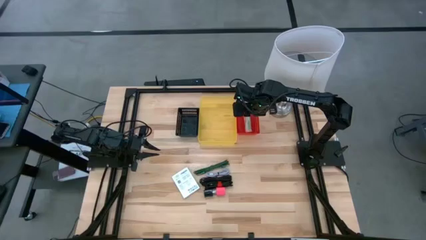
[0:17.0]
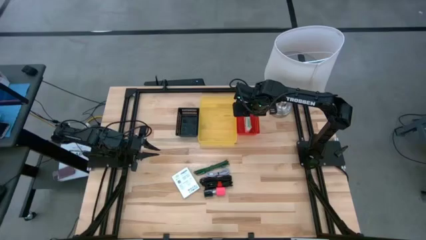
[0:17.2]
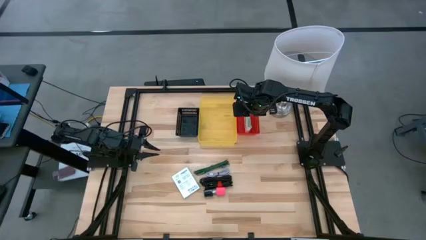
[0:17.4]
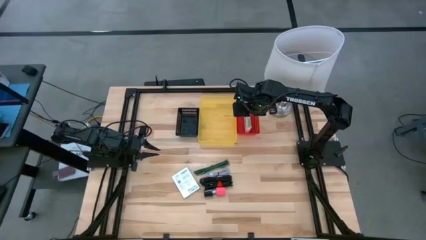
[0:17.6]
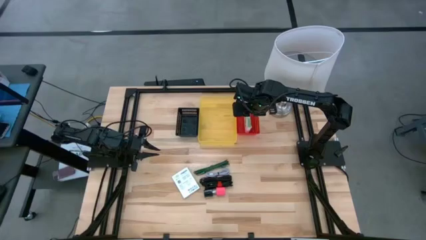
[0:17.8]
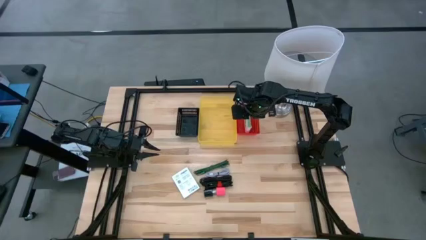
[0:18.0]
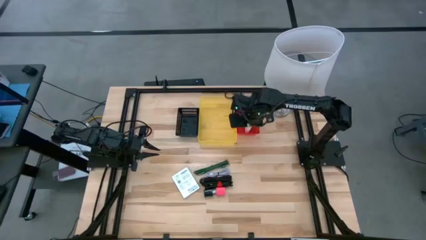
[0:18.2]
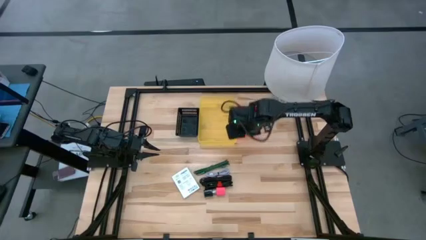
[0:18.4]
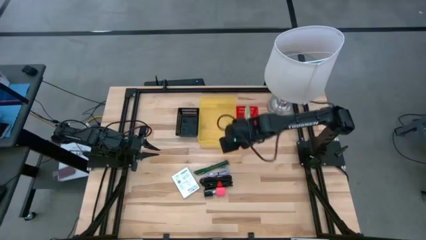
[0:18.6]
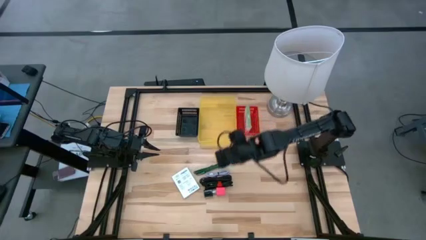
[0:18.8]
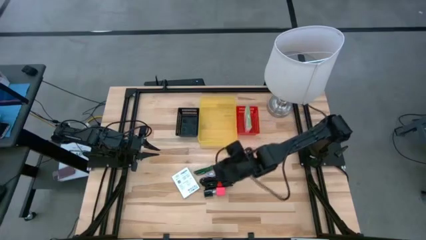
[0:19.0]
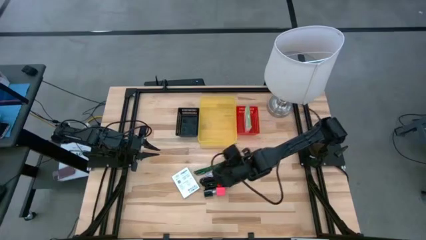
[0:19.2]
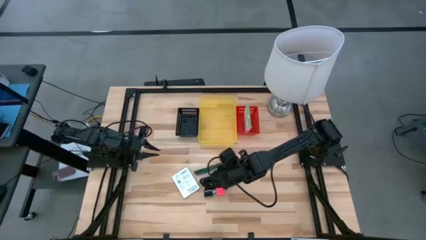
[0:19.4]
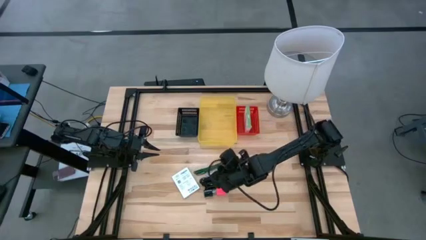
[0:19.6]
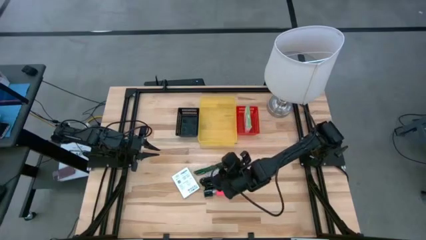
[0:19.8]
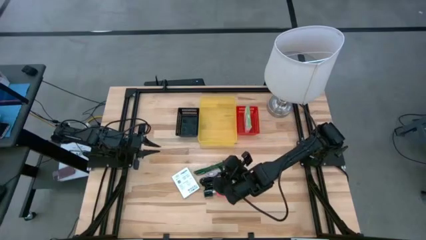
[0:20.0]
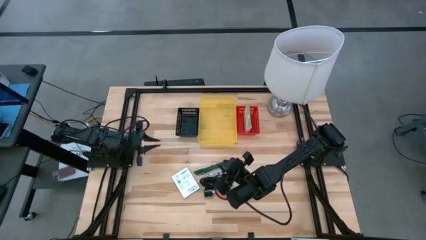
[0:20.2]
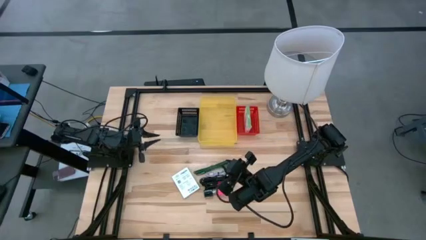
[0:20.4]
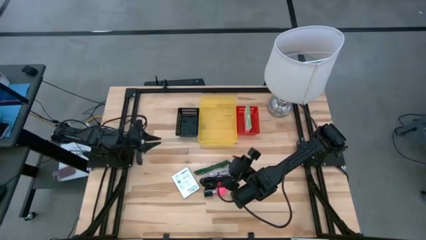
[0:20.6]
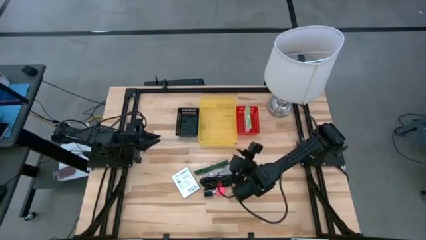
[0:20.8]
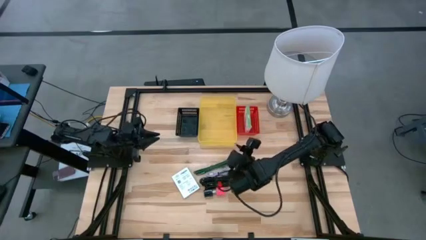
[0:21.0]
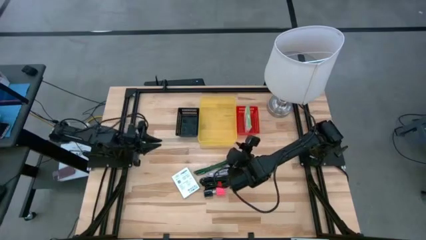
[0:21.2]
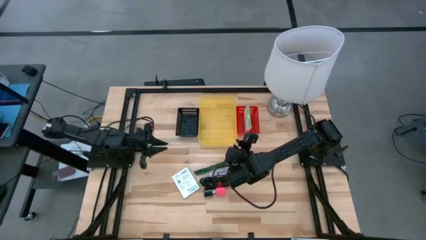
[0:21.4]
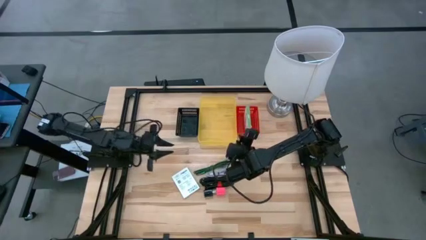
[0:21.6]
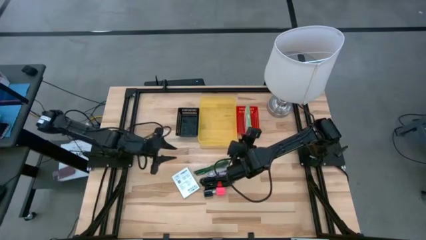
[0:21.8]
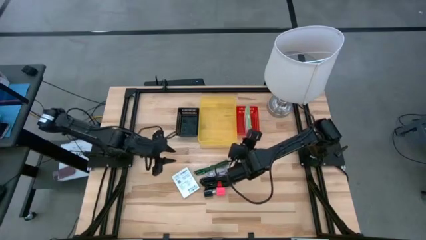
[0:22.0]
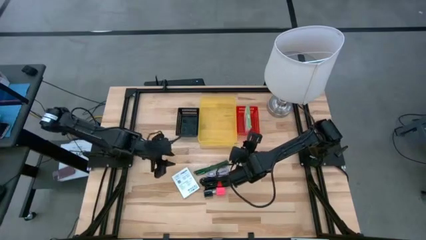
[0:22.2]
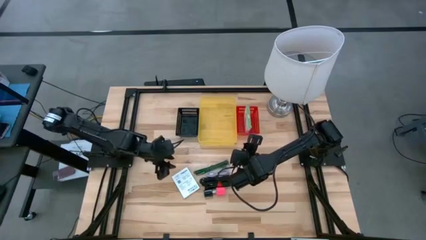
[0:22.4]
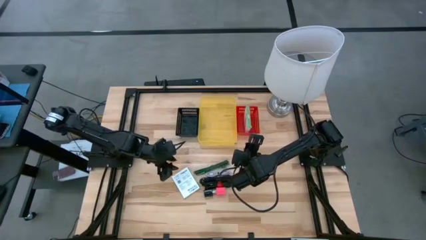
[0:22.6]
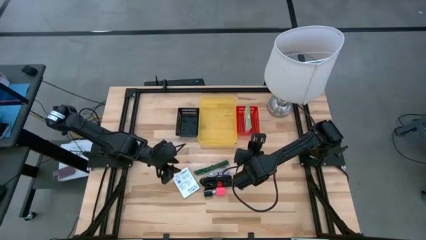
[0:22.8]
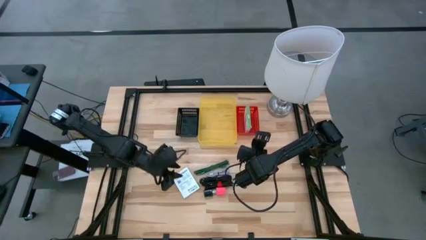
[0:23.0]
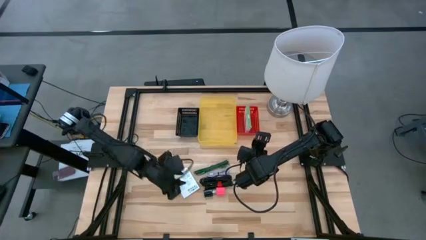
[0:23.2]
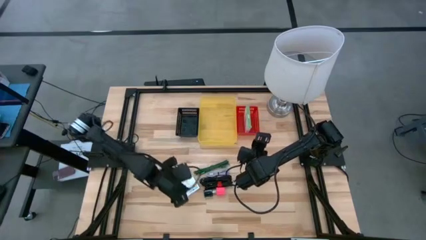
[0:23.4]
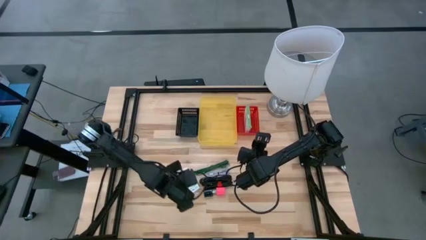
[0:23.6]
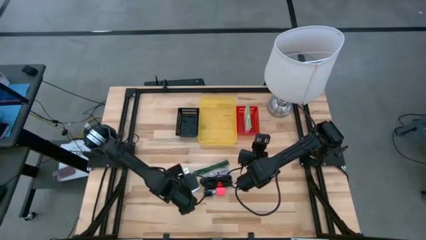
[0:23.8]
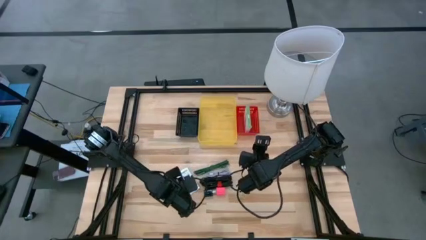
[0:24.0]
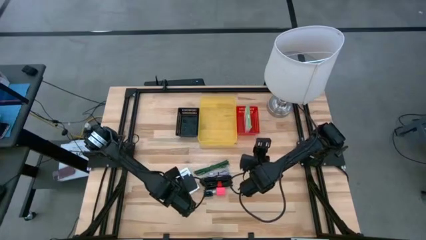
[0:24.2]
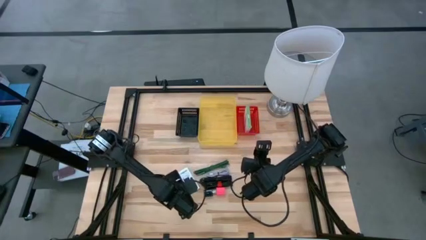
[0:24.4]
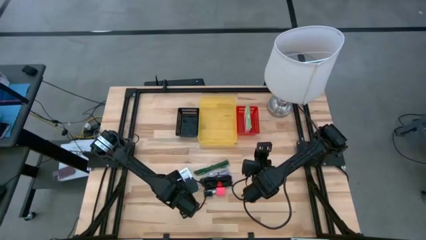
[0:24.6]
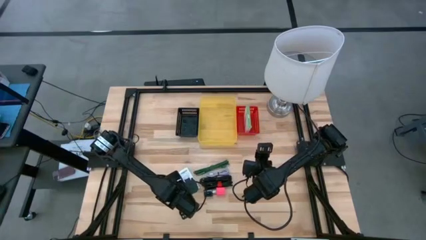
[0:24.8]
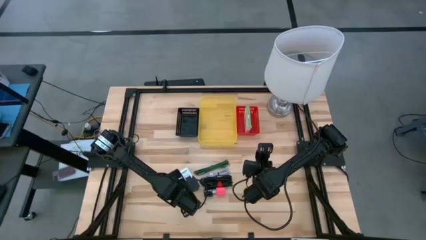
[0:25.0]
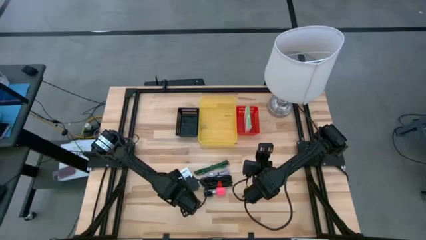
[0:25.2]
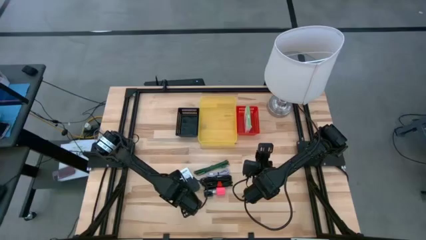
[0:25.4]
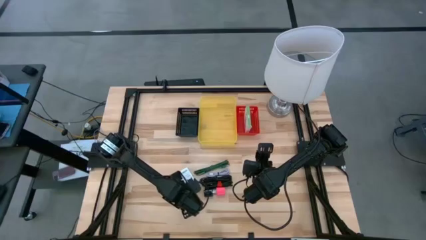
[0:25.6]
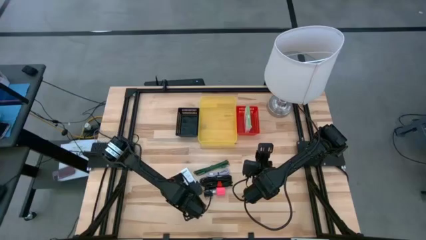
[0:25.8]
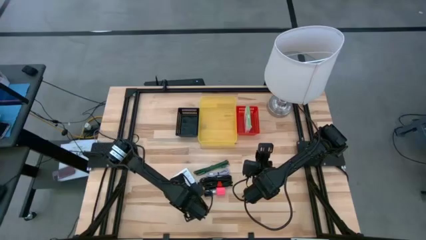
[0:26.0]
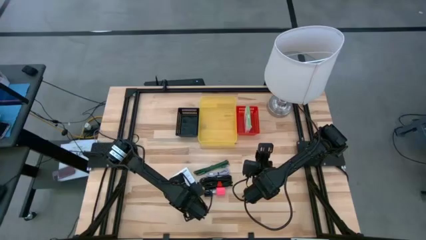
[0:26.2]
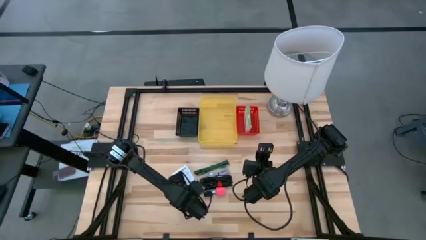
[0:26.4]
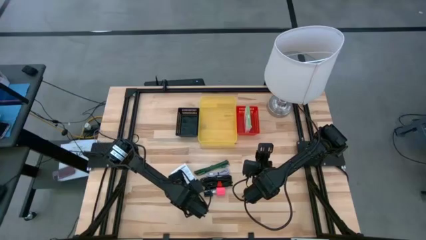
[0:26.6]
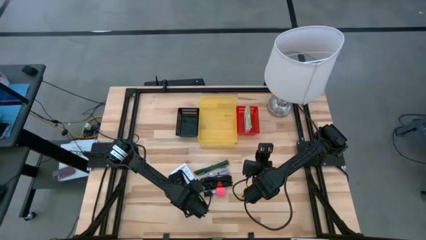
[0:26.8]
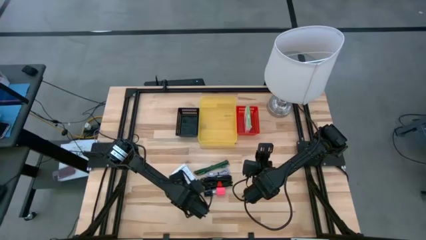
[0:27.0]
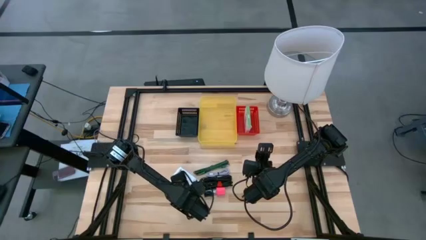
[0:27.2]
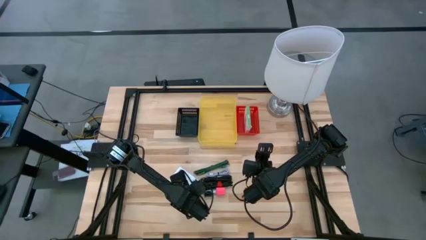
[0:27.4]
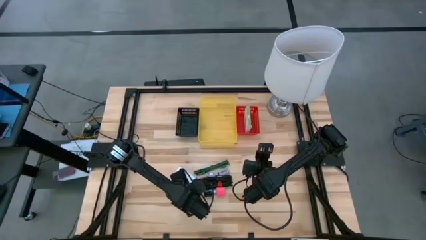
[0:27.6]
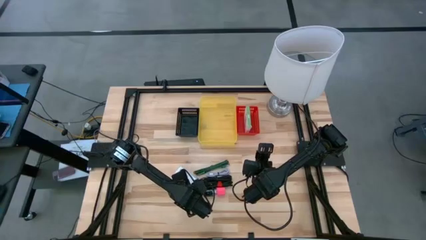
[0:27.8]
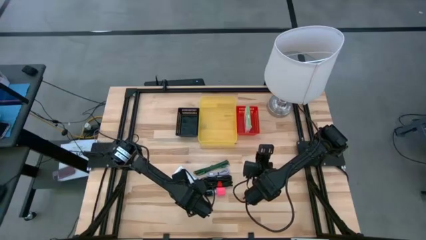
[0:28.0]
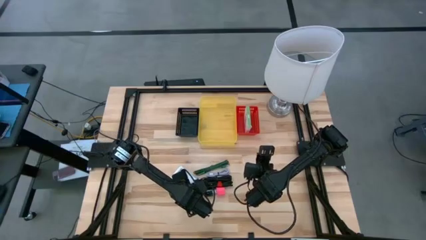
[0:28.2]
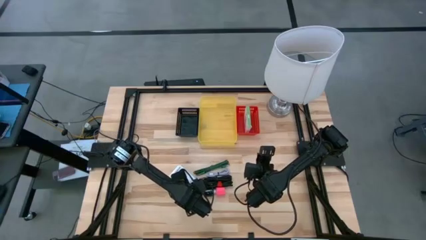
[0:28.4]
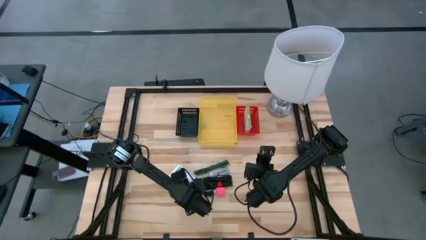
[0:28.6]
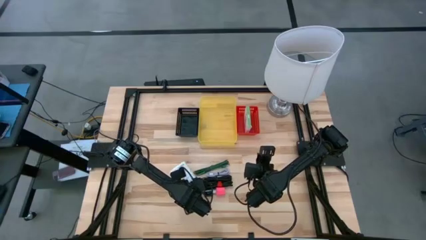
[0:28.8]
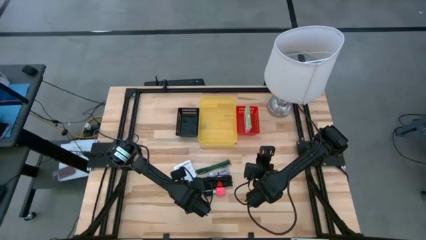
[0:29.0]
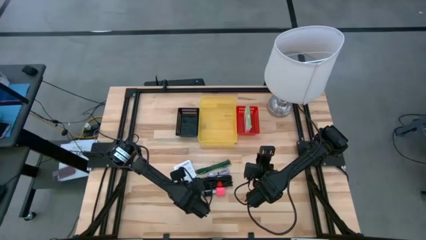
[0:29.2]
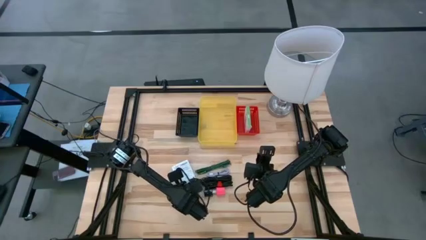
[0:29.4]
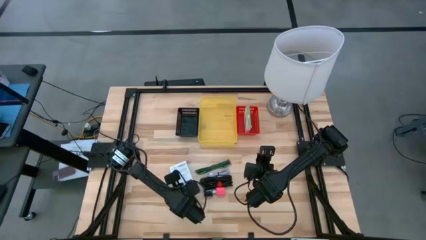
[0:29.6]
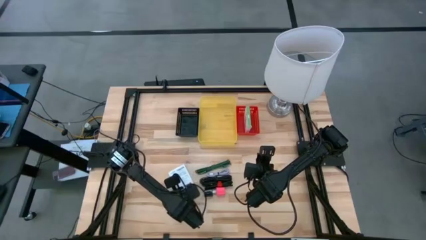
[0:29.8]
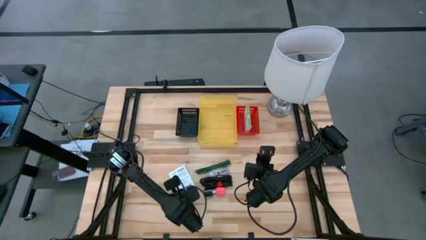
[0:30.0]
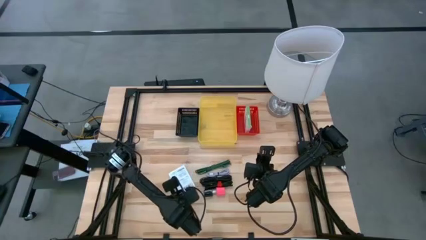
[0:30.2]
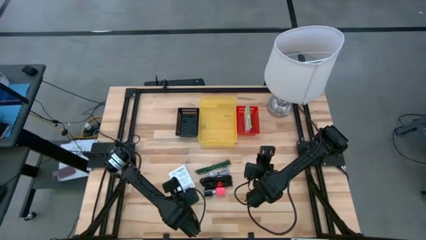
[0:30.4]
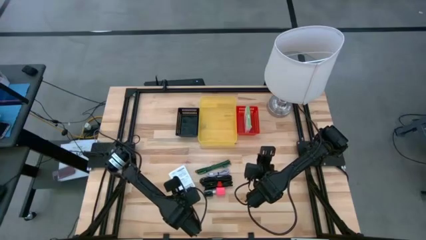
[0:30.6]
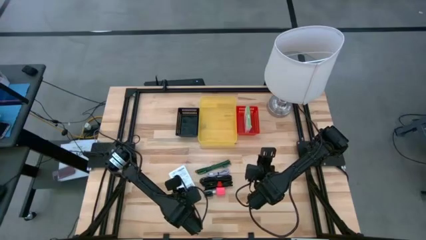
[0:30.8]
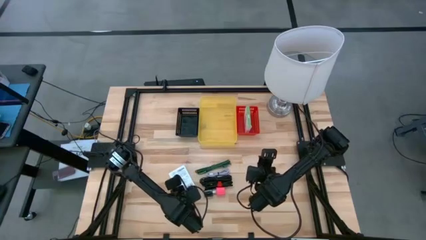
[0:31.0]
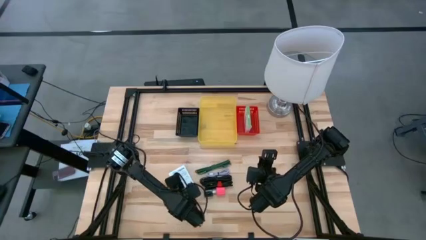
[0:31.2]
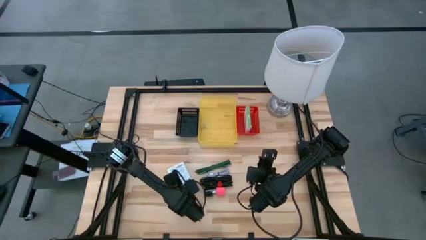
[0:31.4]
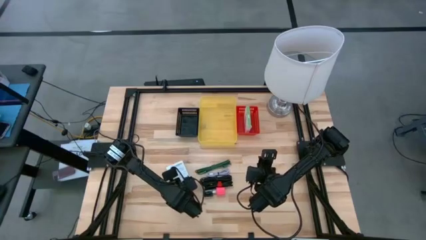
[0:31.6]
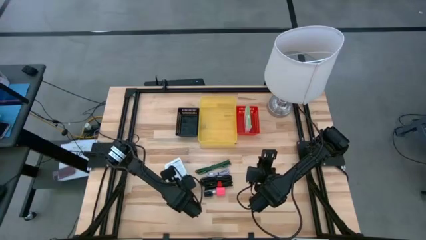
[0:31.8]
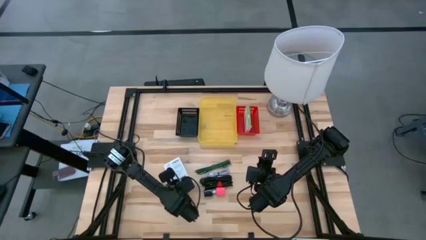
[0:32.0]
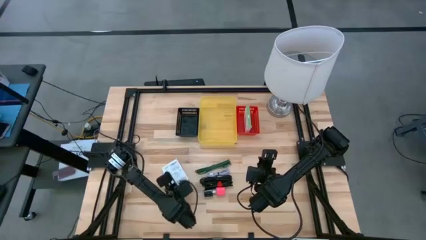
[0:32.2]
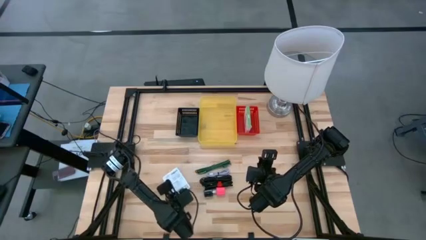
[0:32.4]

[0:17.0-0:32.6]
Task: Pick and place items into bin
Put the white and green card reader box into the red bin
